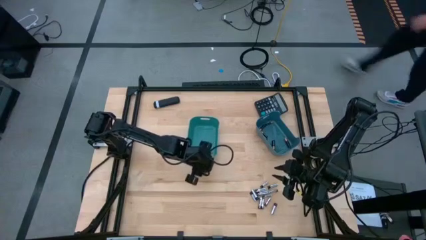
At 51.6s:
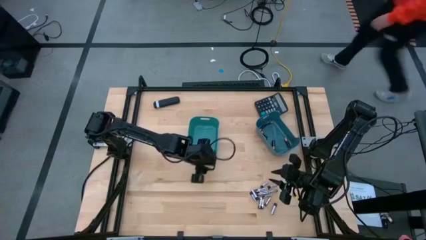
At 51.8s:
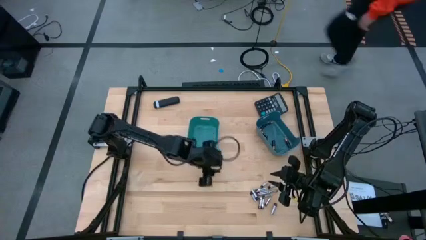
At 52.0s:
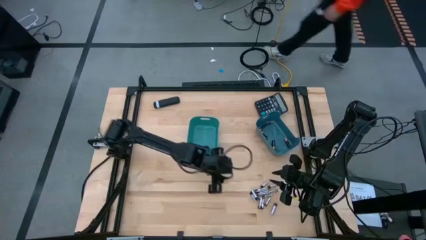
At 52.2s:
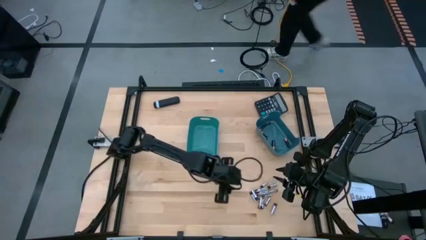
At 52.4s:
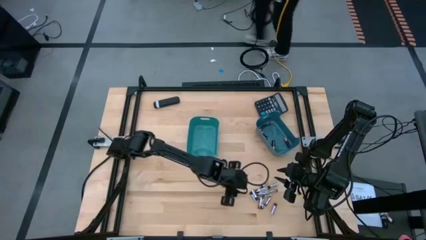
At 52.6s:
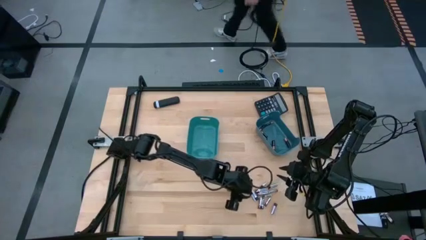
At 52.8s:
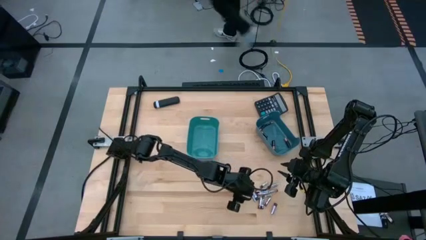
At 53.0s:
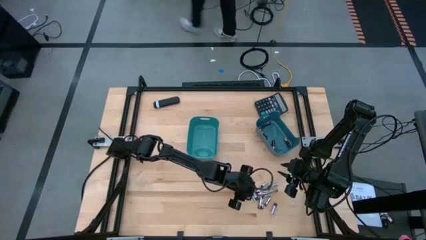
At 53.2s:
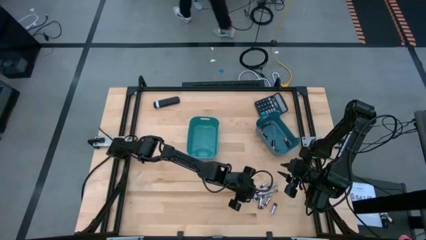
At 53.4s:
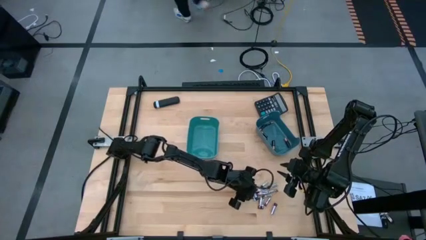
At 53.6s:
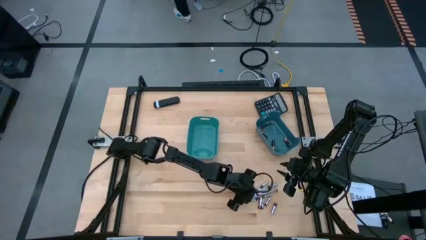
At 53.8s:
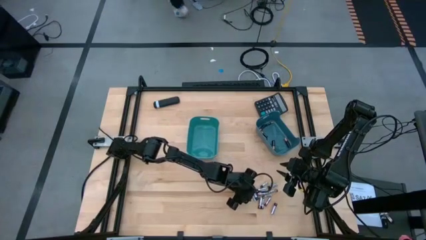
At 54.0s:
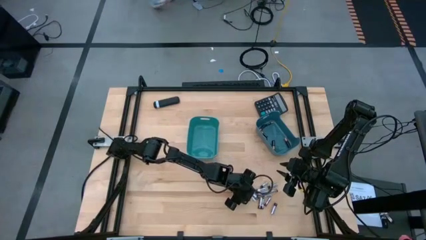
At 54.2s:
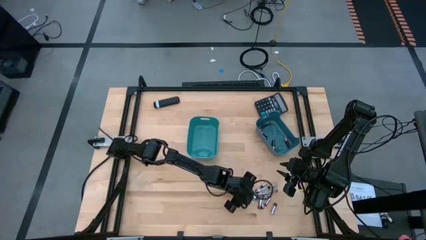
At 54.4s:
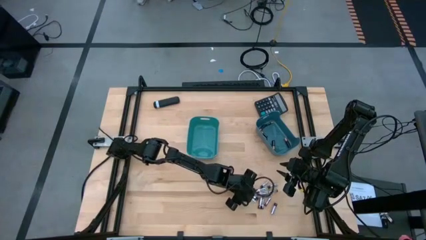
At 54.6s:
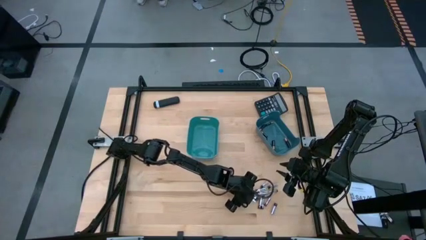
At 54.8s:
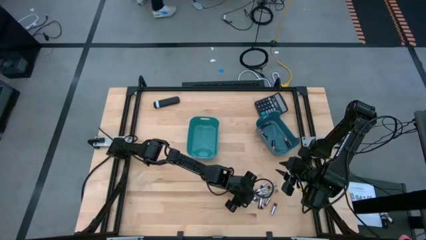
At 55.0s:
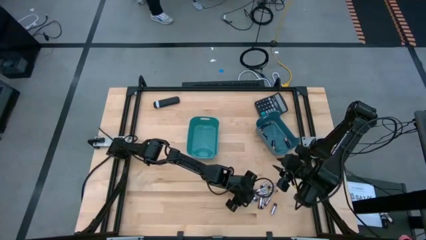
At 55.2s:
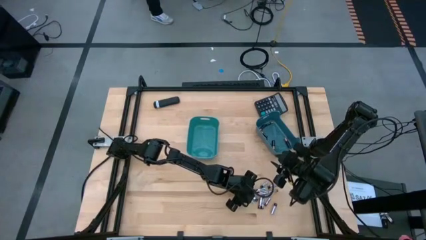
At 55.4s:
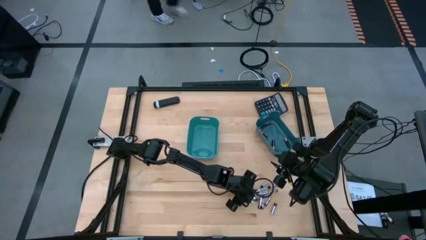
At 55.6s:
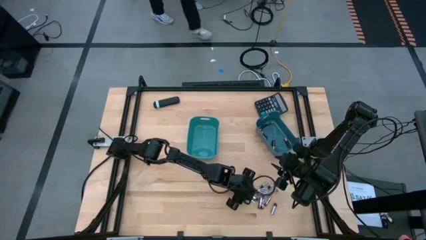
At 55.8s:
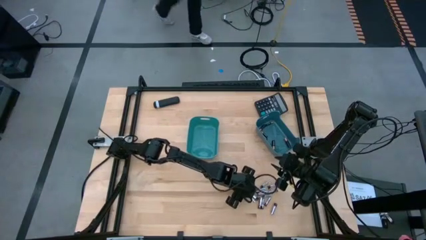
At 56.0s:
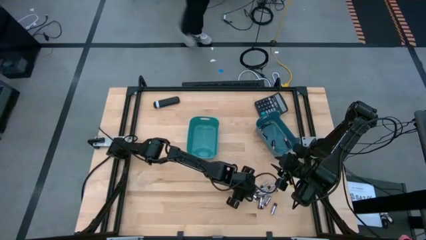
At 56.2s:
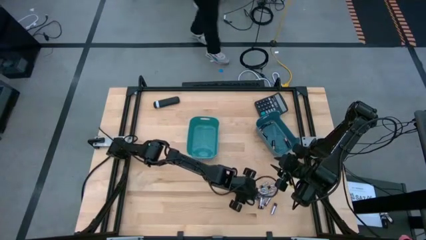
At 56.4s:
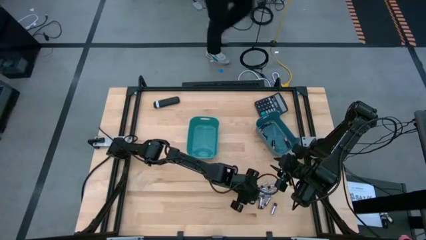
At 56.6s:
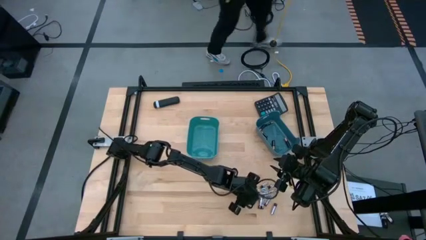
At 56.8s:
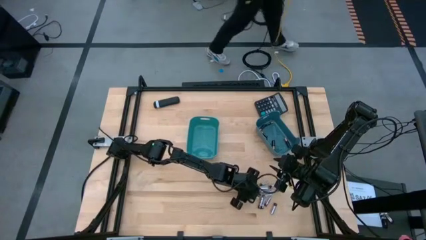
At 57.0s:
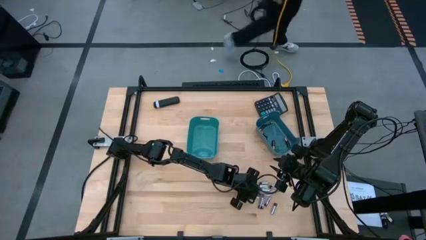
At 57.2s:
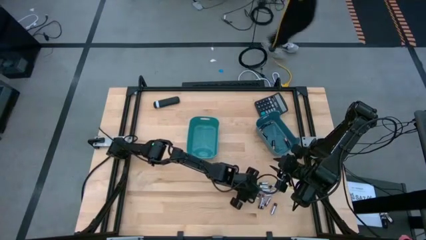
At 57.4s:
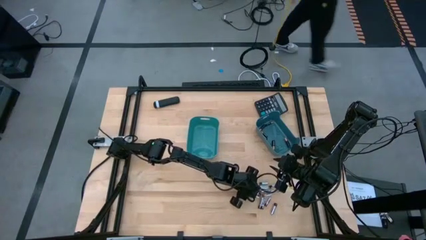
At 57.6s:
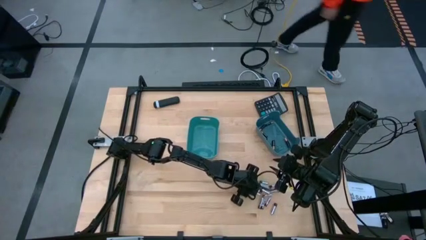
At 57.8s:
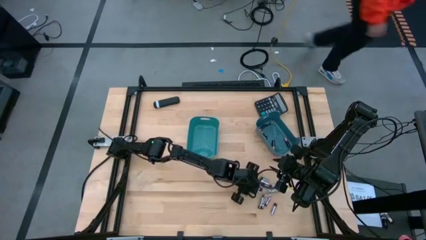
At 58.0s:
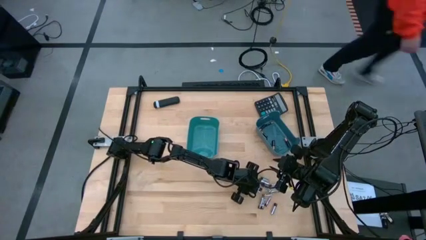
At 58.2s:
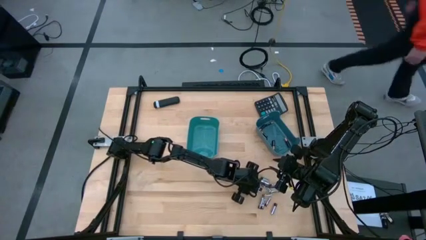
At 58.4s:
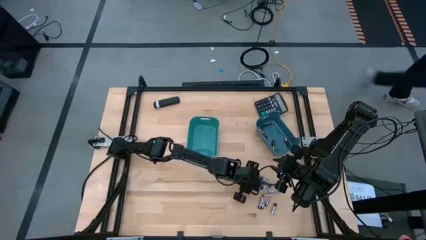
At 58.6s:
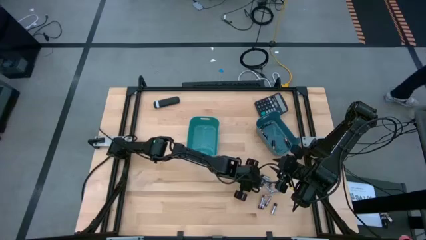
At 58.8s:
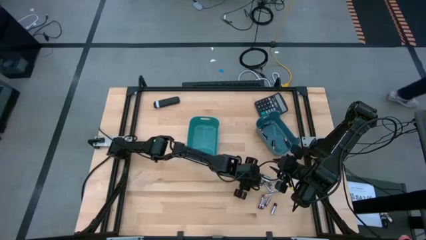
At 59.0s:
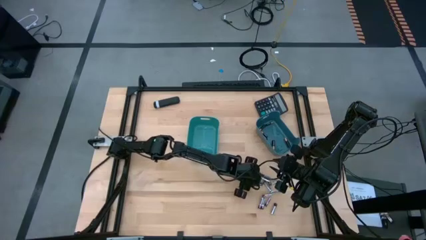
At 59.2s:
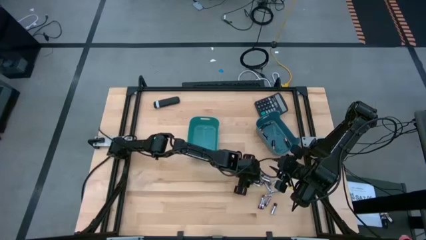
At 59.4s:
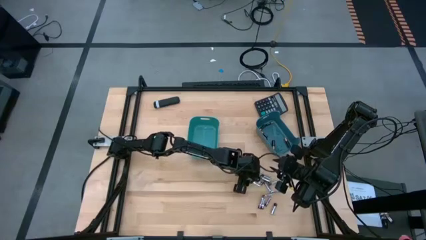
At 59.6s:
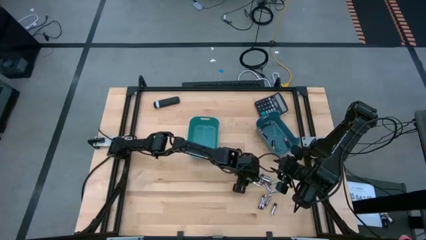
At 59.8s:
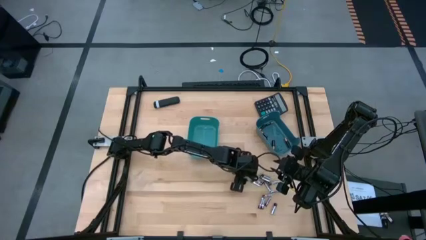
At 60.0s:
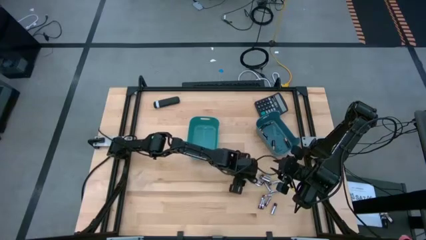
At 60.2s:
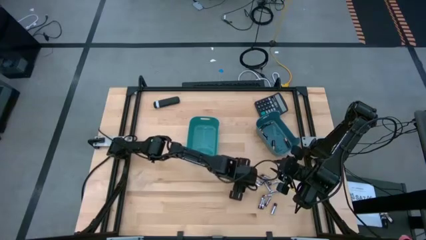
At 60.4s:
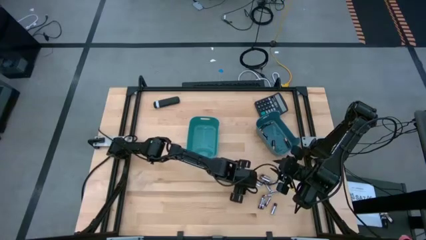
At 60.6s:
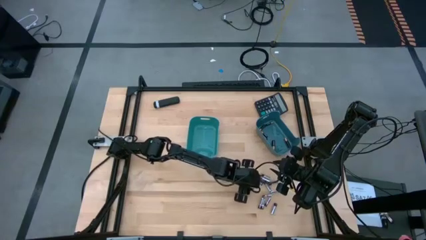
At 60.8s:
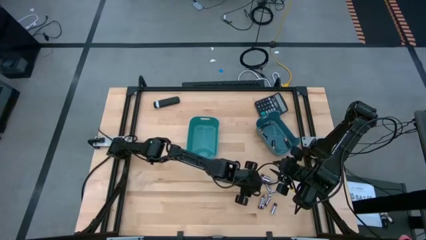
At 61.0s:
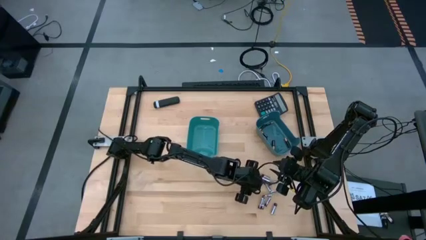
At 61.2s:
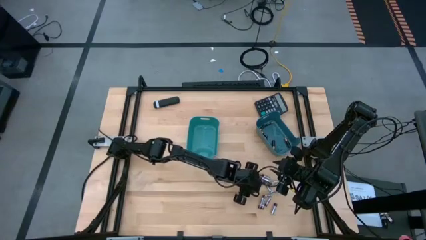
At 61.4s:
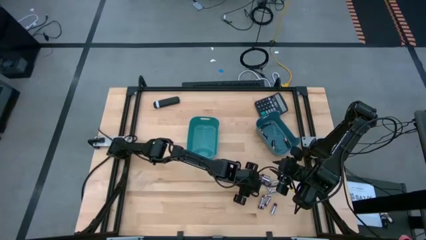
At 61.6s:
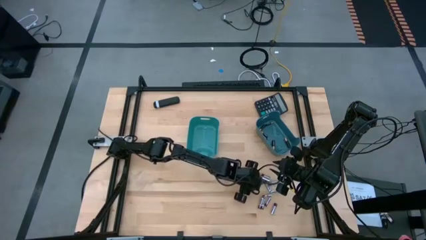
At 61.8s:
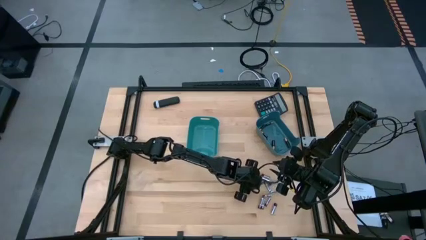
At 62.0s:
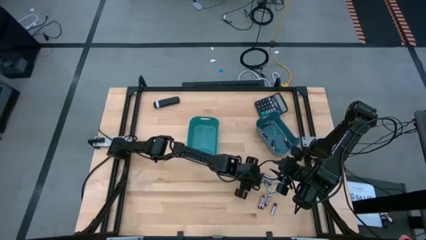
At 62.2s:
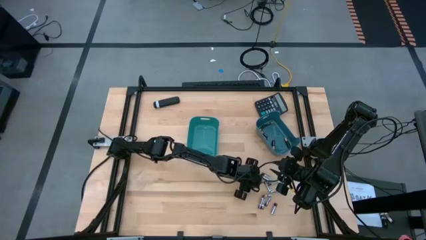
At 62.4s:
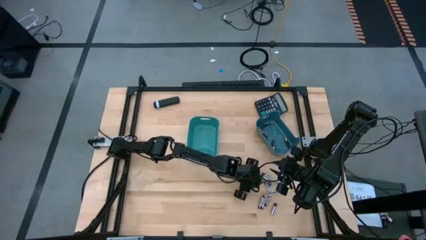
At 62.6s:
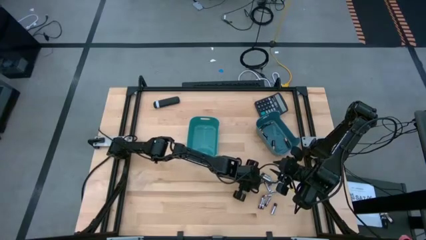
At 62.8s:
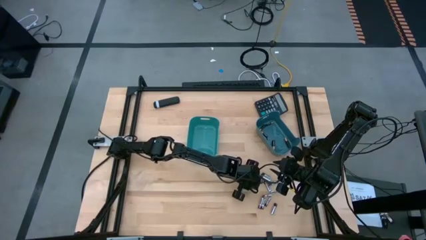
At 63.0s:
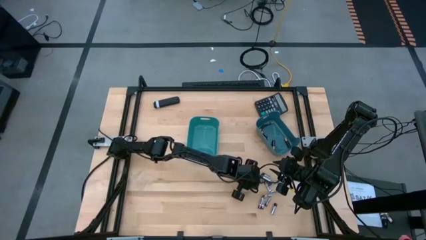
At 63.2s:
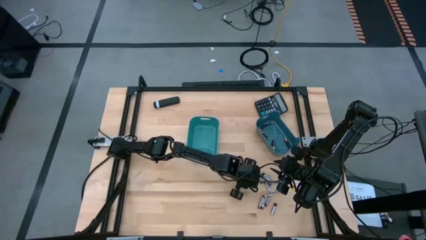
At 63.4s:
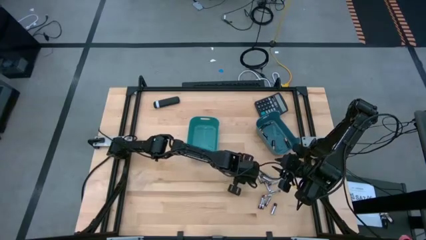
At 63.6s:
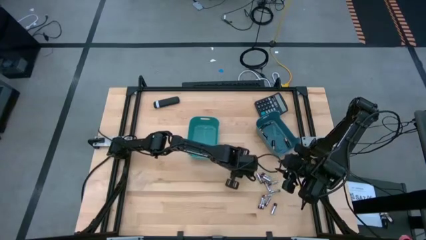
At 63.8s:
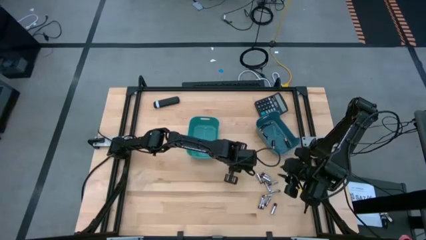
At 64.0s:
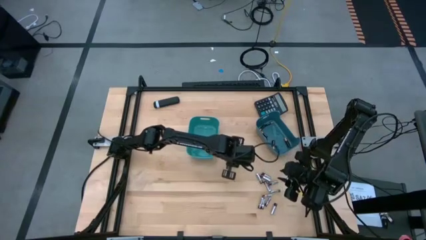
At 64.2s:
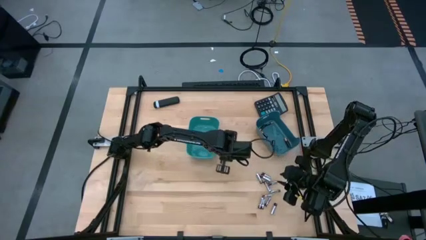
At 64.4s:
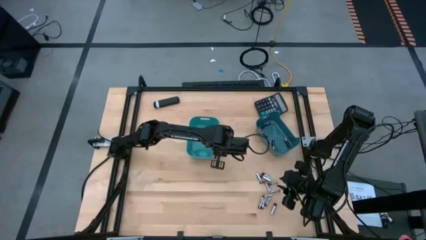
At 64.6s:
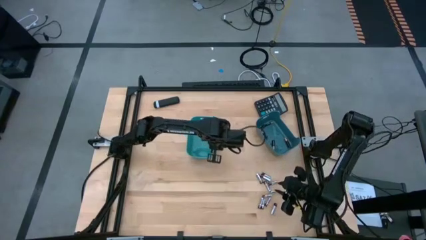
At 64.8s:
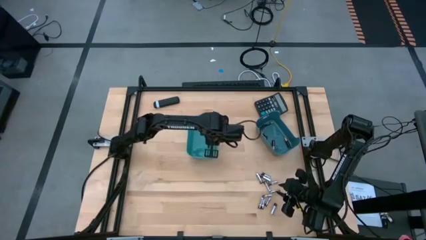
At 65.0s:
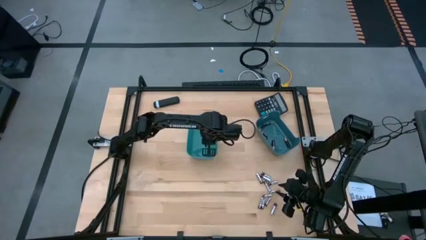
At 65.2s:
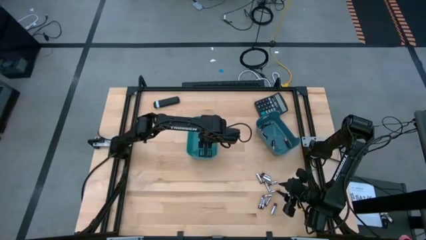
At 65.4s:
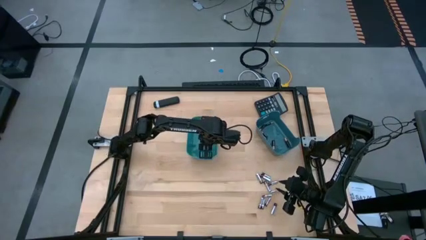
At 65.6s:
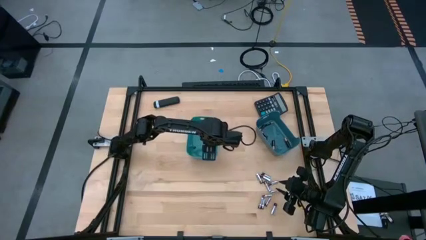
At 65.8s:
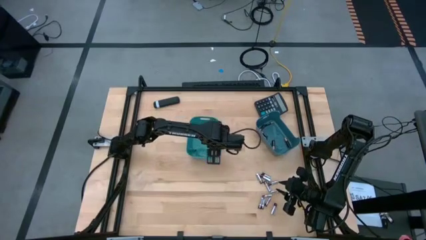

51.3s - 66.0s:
Task: Sort batteries
Put the silver battery into the green bin

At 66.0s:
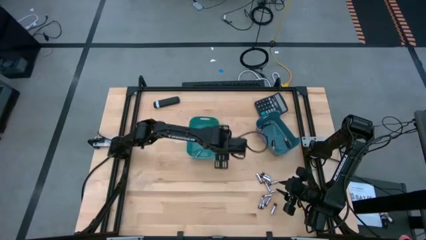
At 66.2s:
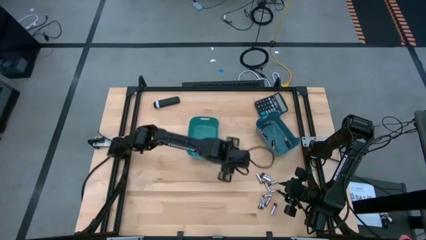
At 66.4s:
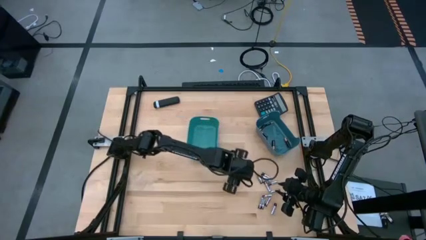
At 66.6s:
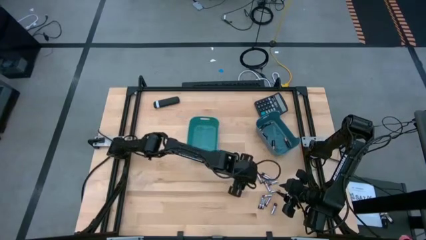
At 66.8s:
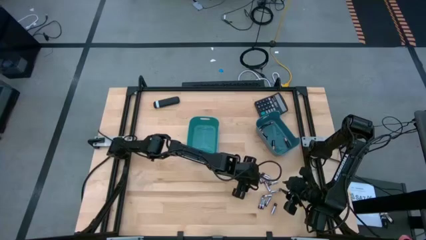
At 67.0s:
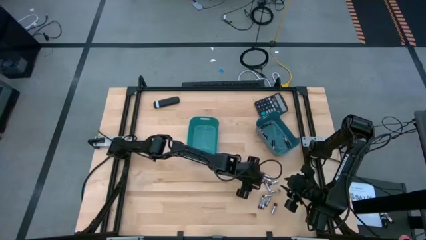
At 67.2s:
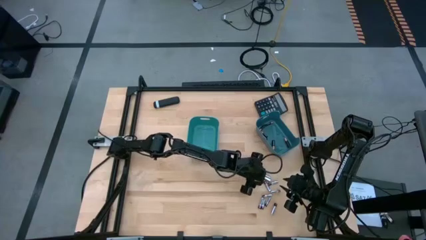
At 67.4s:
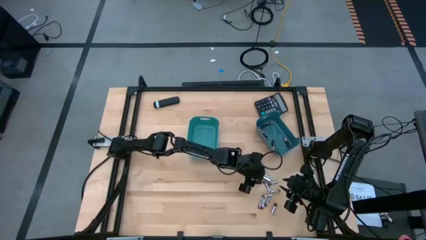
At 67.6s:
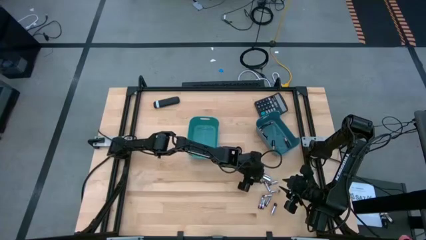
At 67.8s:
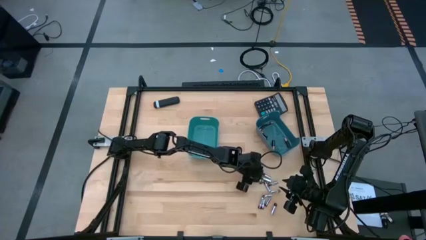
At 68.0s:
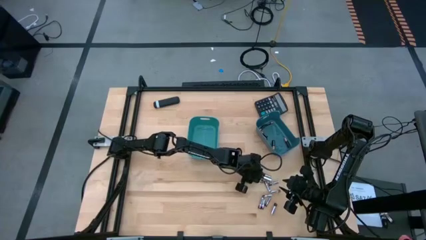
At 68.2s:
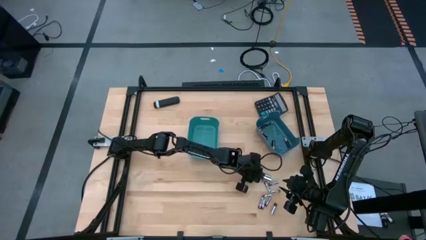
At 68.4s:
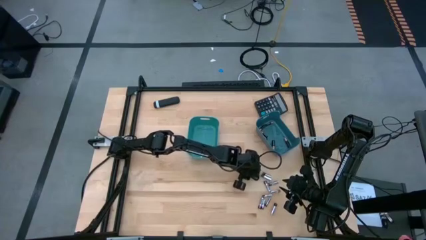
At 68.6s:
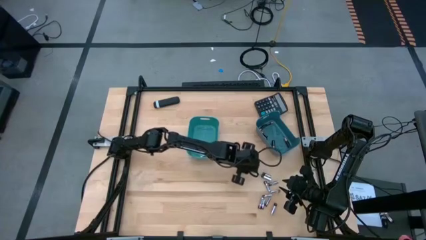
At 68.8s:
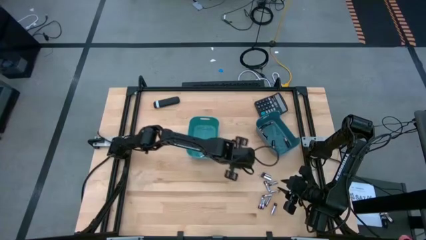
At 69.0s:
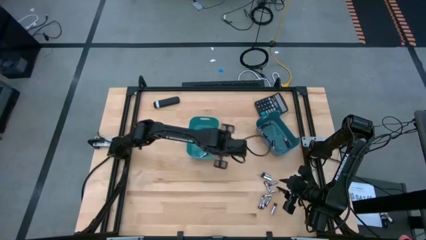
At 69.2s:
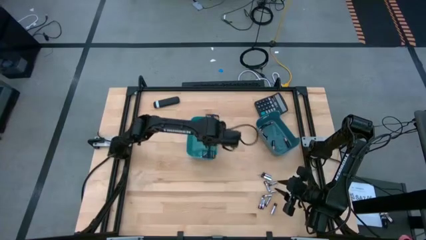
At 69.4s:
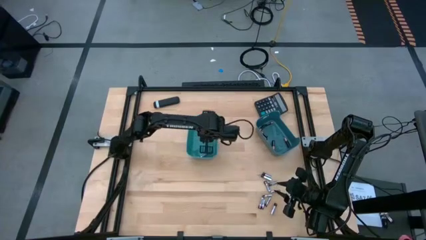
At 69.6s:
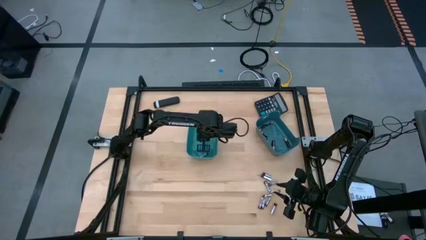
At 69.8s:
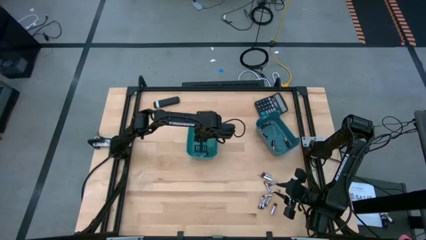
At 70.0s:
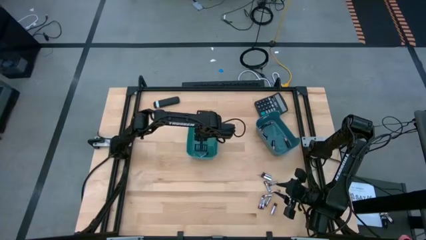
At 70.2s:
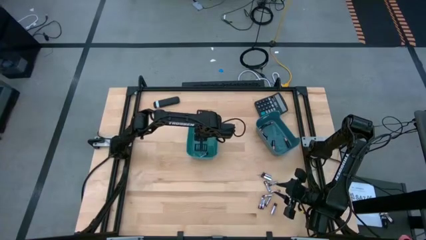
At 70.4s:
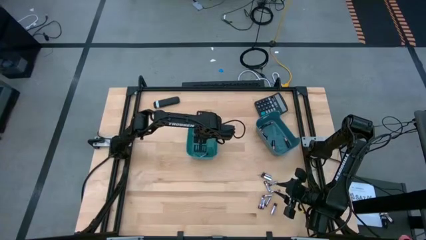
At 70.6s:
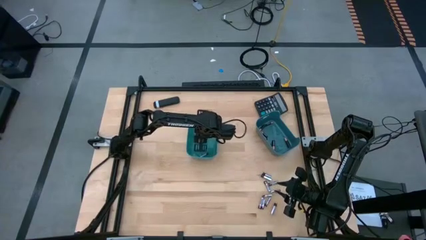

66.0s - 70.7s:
Put the silver battery into the green bin
